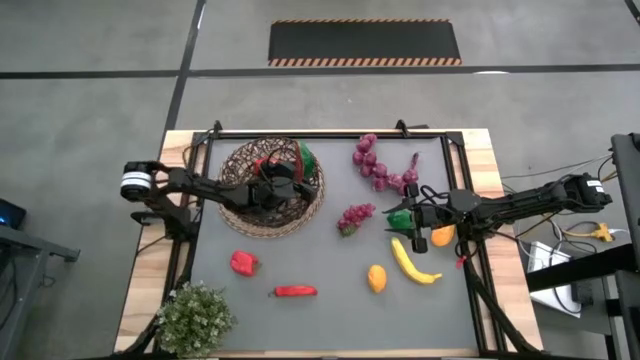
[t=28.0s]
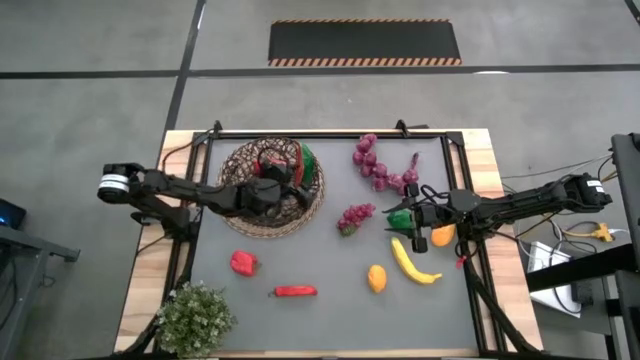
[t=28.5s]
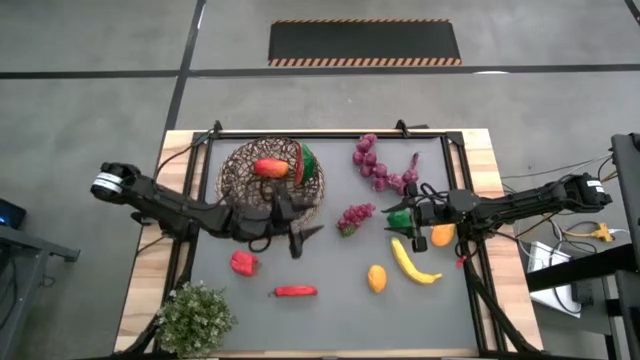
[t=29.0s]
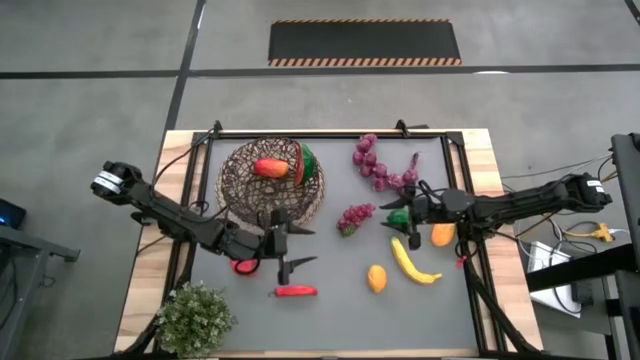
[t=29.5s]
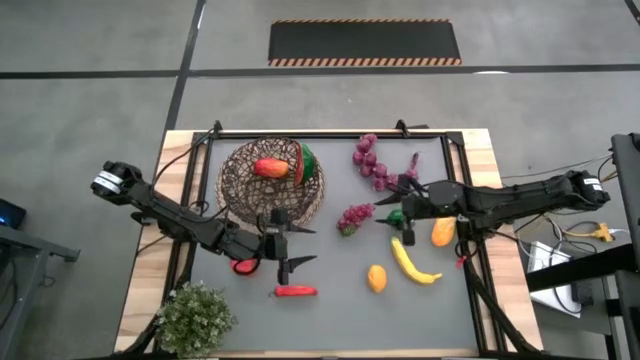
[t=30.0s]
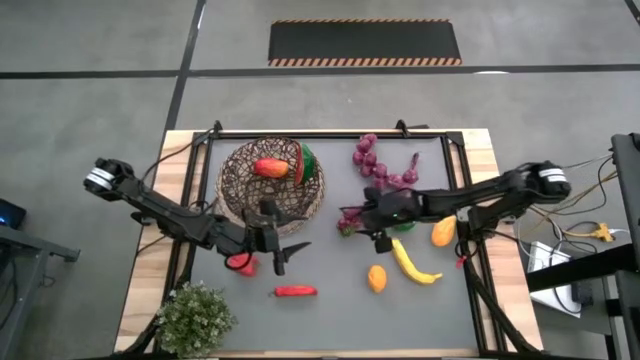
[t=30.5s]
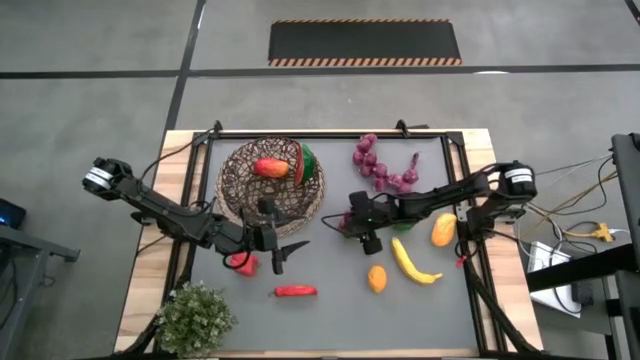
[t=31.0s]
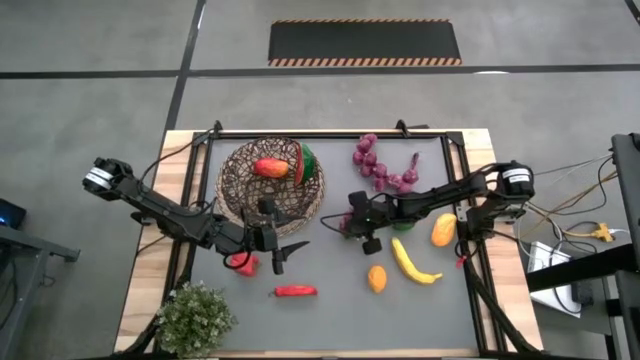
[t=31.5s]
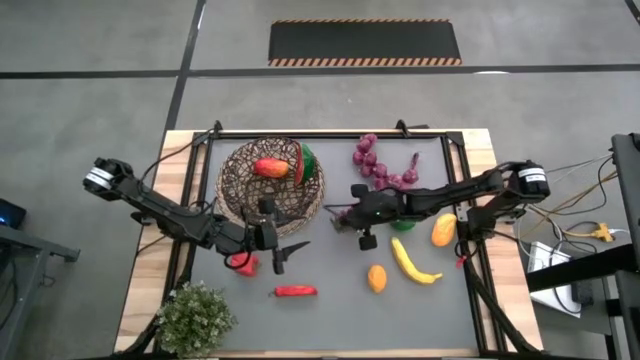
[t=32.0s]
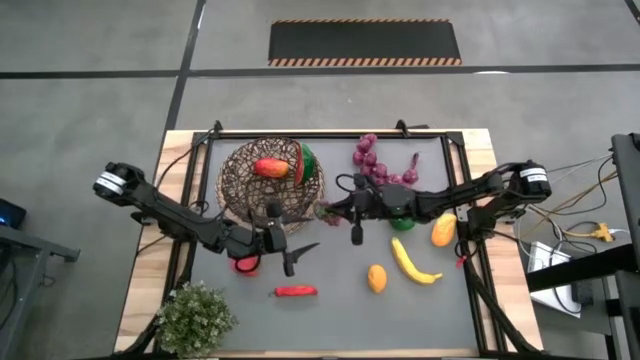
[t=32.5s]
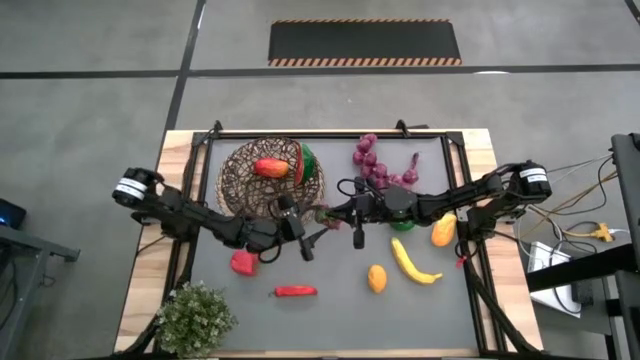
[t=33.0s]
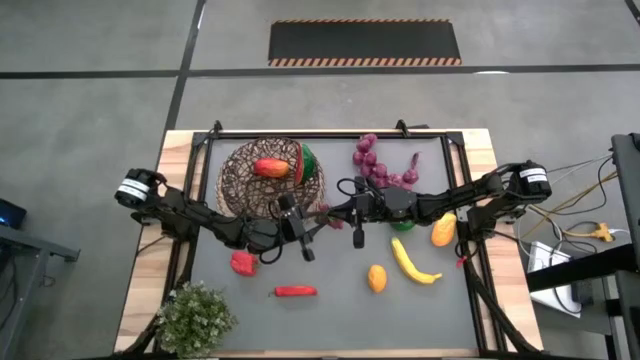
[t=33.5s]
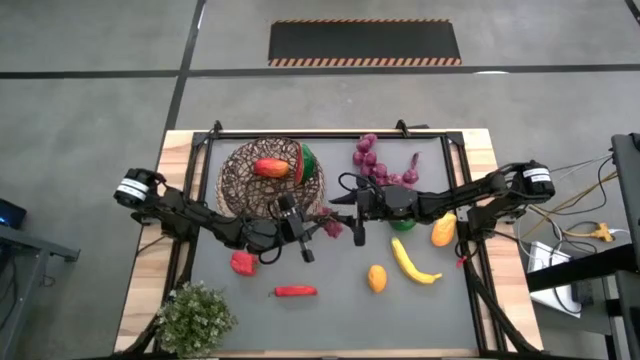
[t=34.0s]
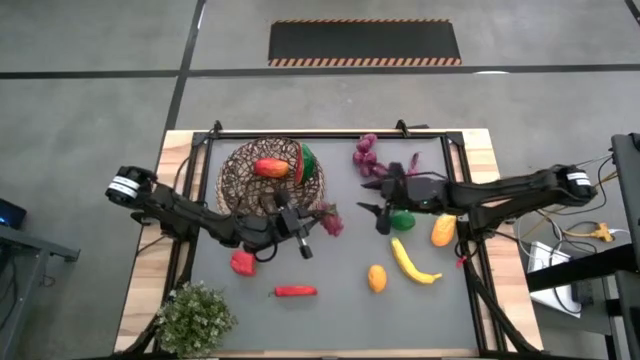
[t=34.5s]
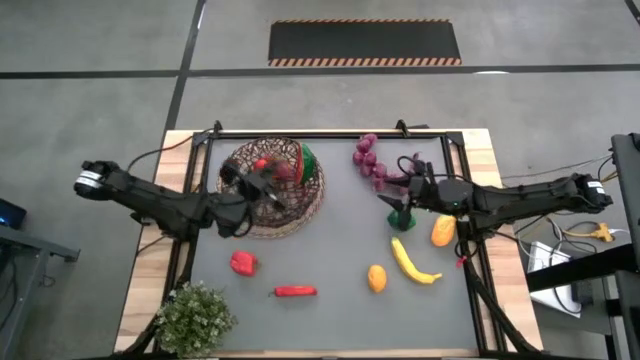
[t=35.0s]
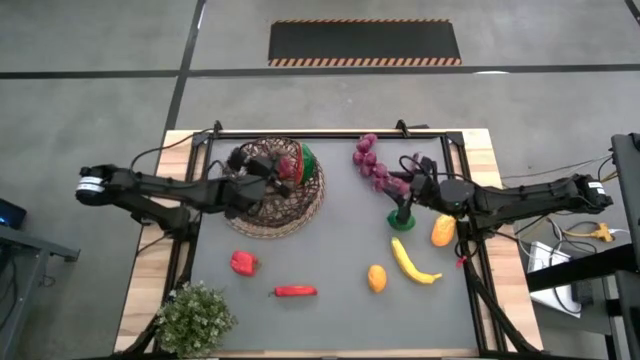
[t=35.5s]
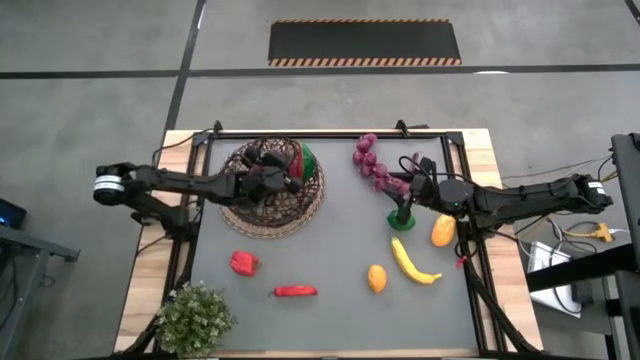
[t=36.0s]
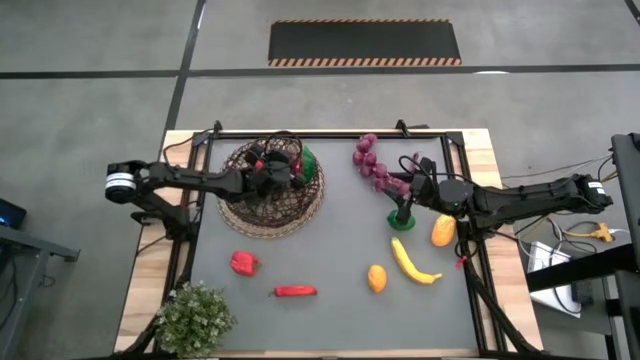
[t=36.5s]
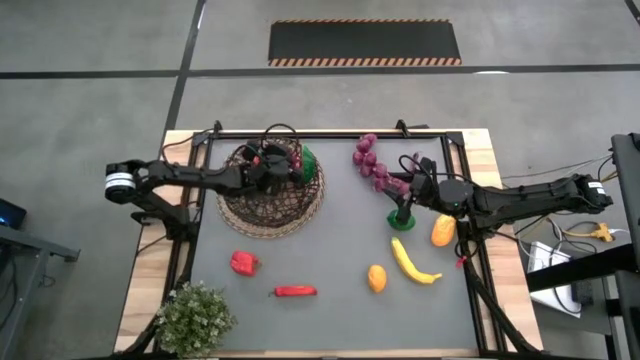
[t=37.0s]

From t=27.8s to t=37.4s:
Task: Build produce basket
Put the grapes into the wire basket

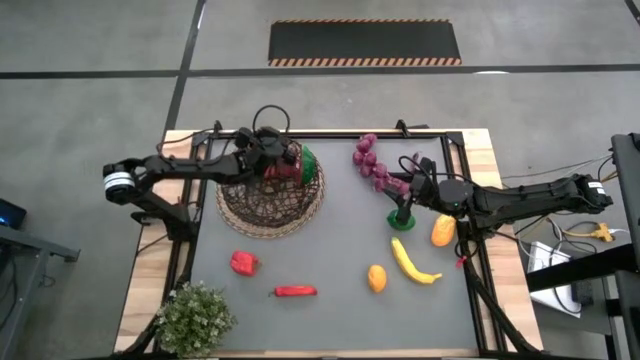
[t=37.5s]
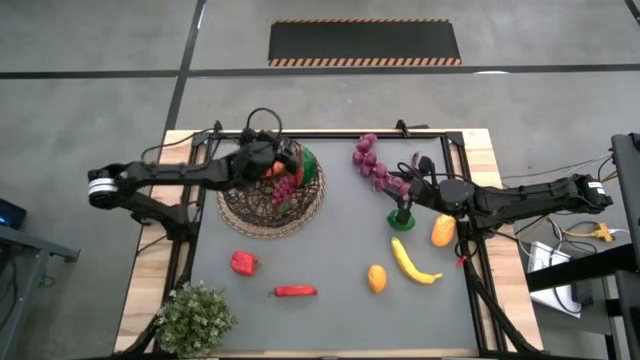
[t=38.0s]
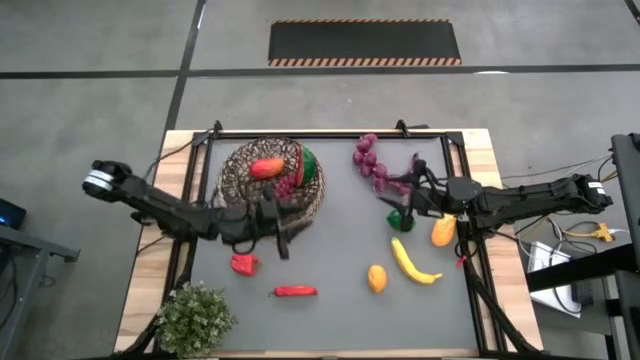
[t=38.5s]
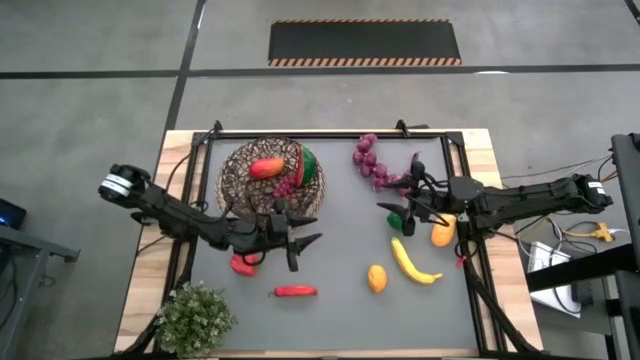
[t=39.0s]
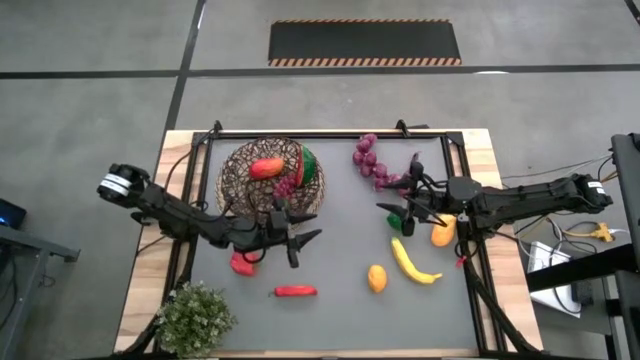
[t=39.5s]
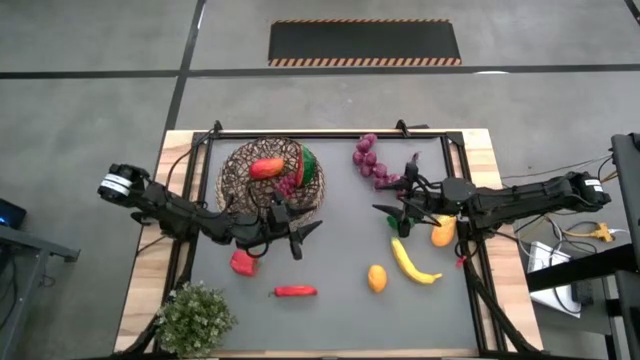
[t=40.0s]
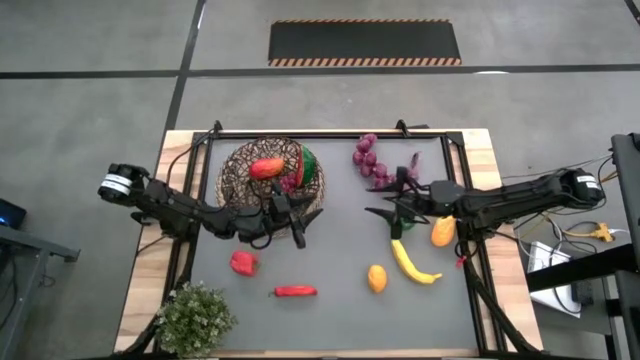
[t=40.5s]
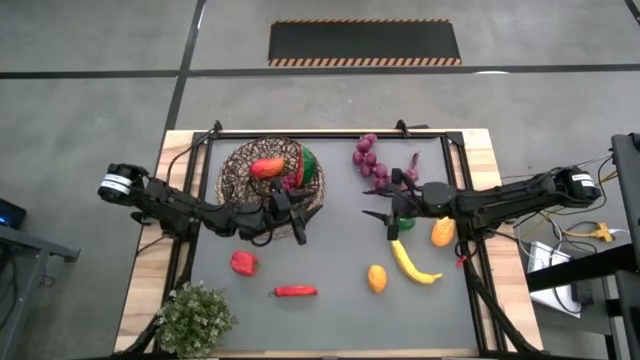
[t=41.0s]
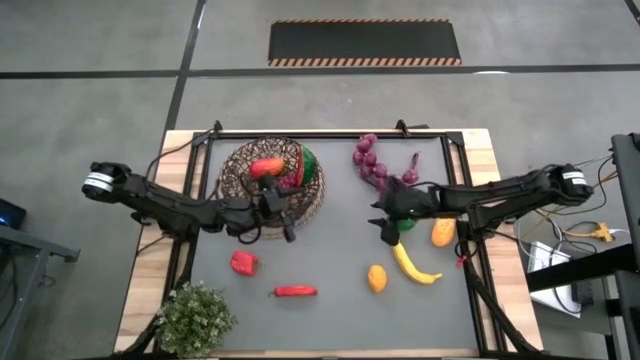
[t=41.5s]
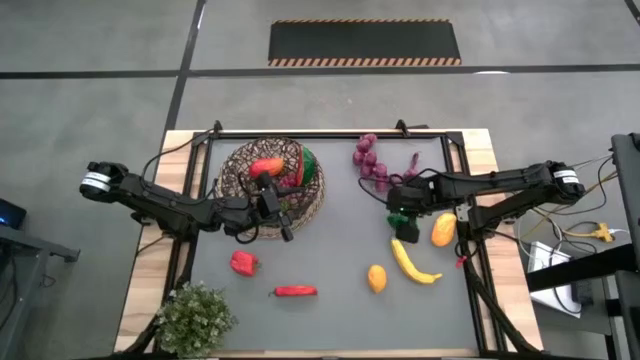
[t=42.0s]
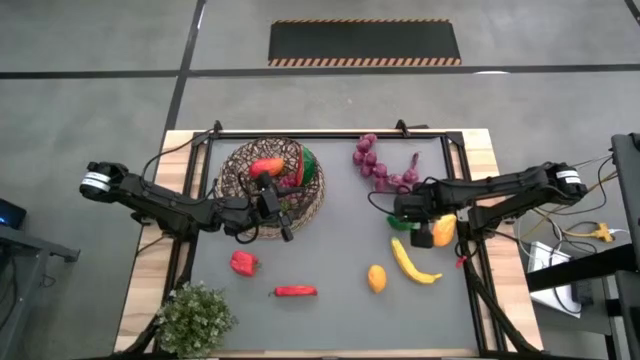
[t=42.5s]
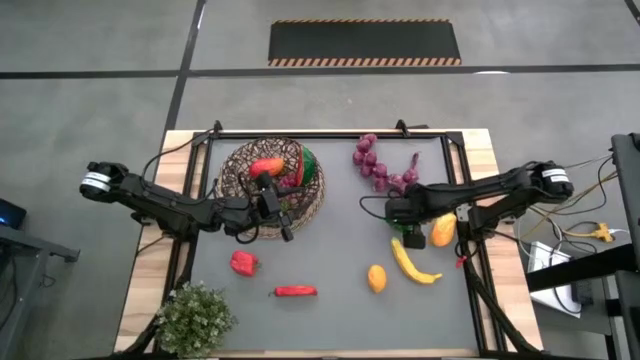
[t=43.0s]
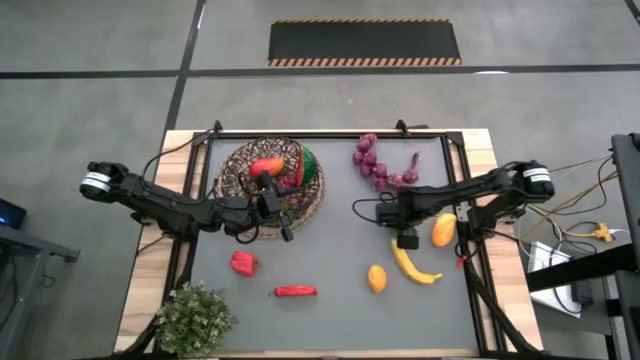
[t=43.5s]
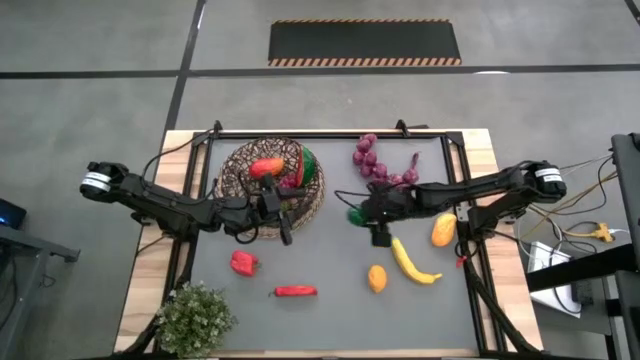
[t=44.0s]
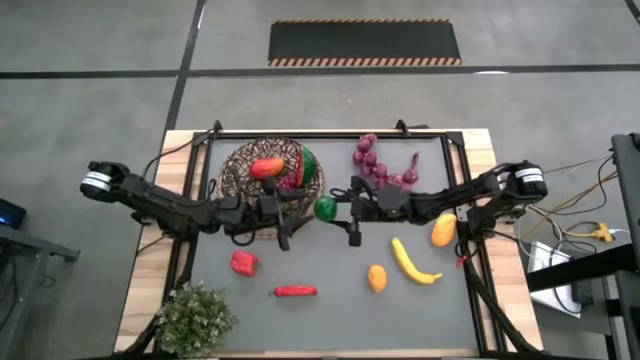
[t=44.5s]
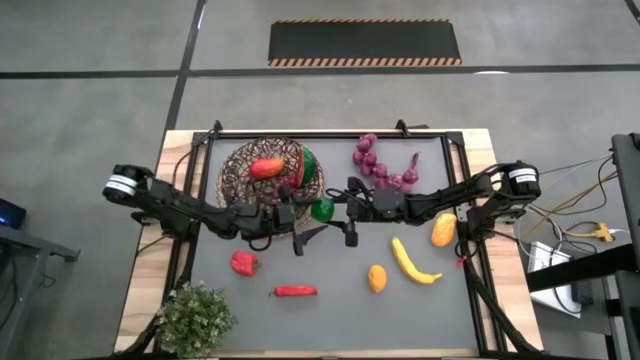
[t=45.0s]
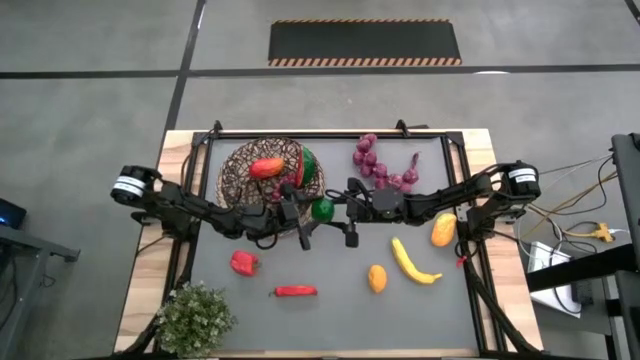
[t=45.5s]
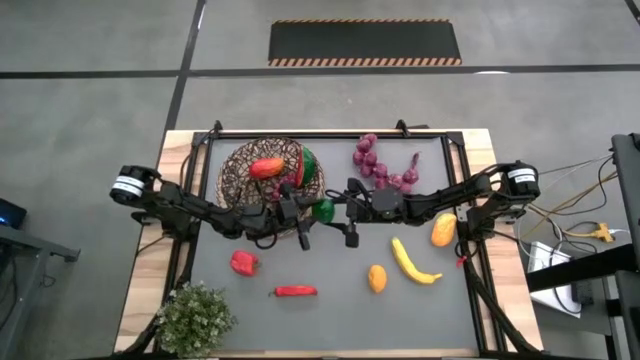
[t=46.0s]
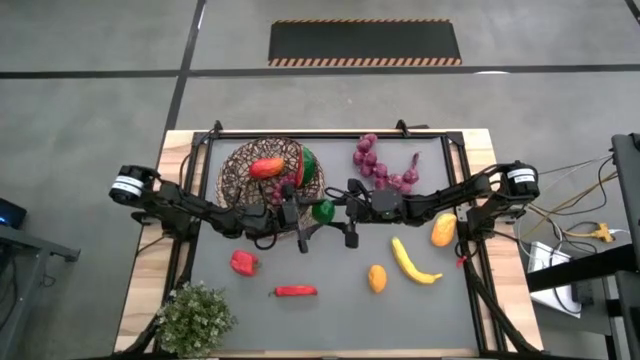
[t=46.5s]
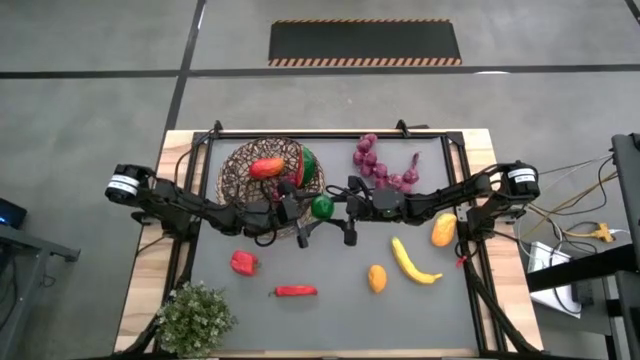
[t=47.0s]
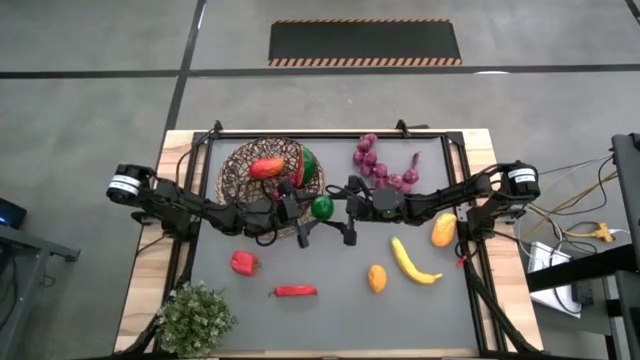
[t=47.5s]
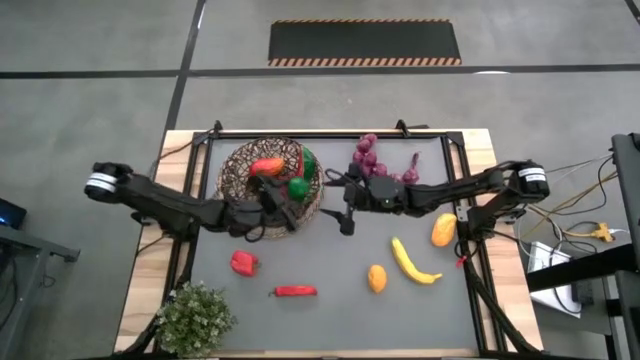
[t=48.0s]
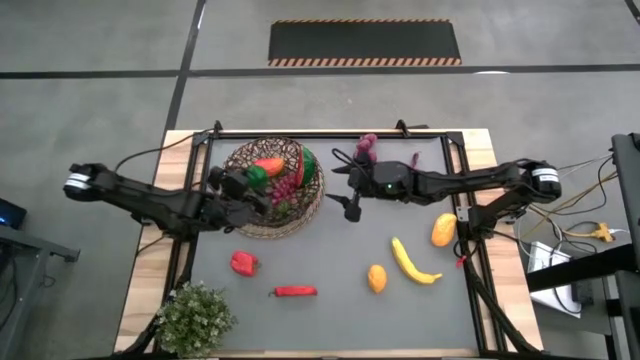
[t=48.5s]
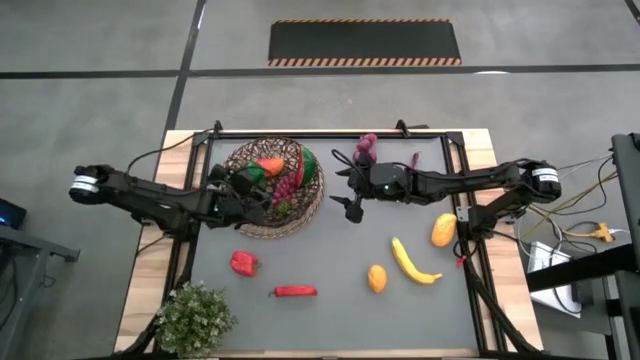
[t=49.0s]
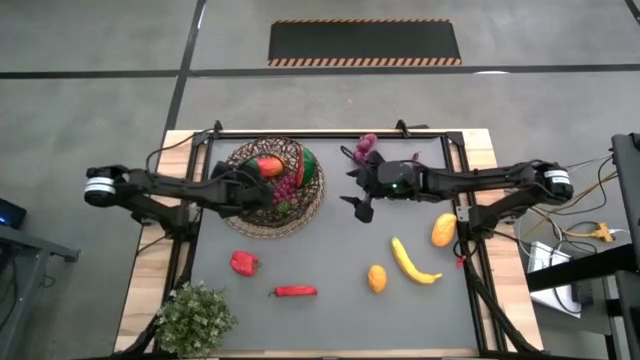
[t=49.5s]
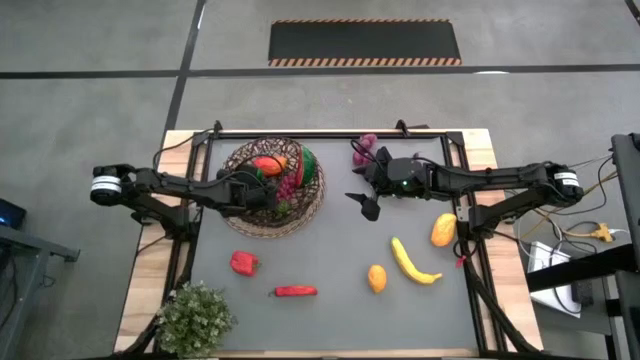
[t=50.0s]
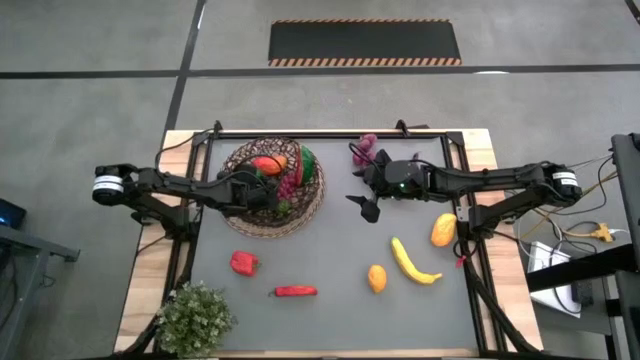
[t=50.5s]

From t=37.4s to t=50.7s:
Put the lime into the wire basket
